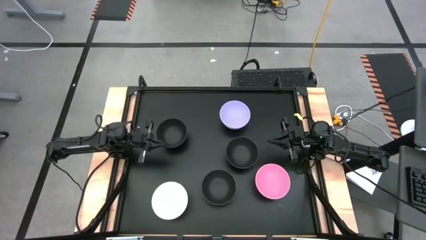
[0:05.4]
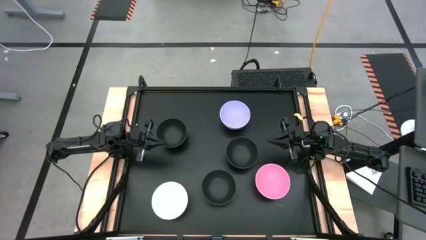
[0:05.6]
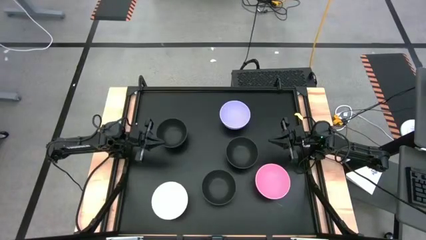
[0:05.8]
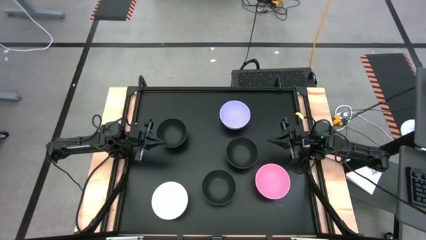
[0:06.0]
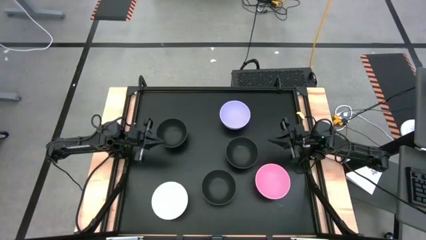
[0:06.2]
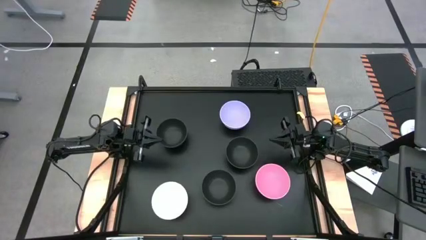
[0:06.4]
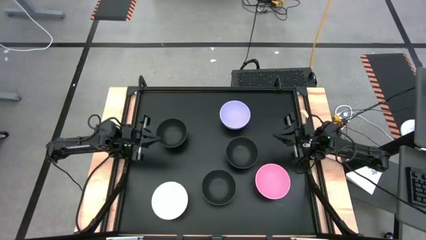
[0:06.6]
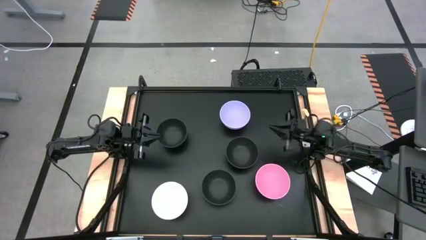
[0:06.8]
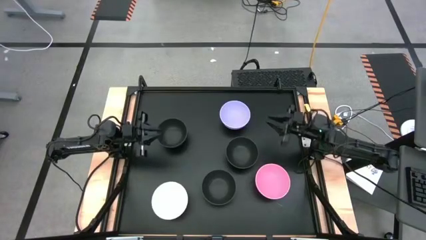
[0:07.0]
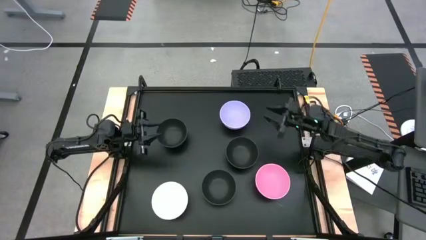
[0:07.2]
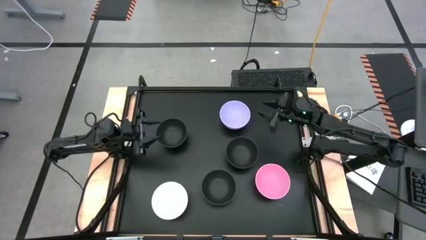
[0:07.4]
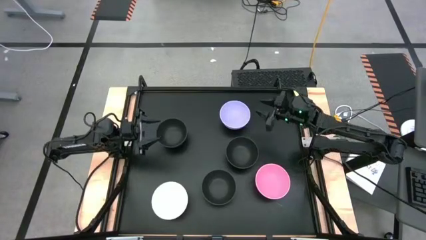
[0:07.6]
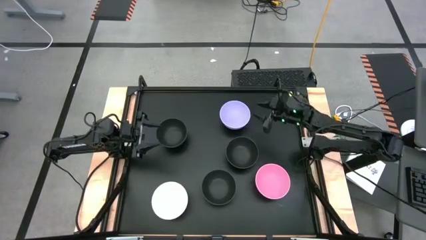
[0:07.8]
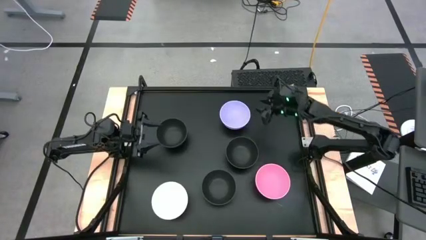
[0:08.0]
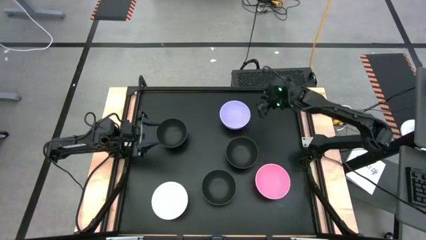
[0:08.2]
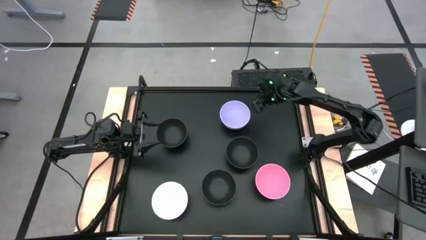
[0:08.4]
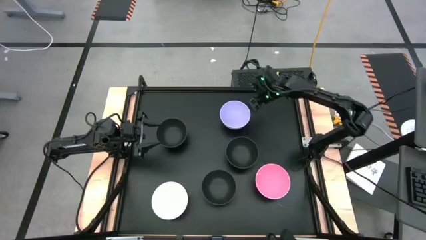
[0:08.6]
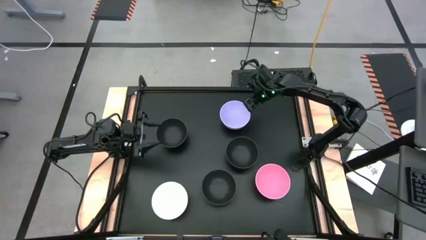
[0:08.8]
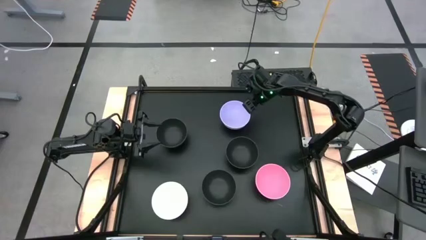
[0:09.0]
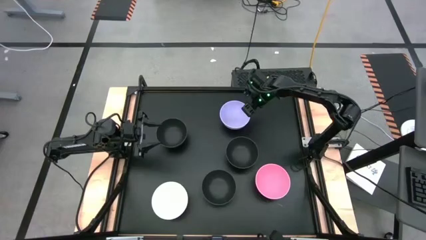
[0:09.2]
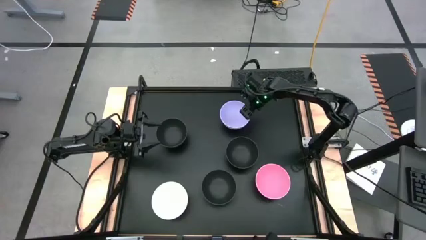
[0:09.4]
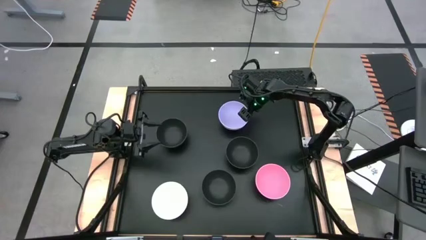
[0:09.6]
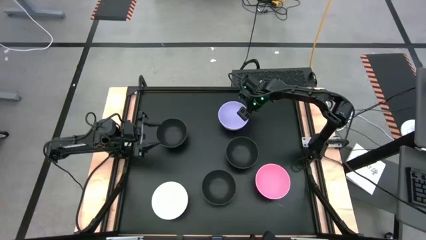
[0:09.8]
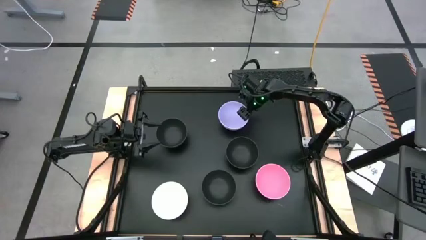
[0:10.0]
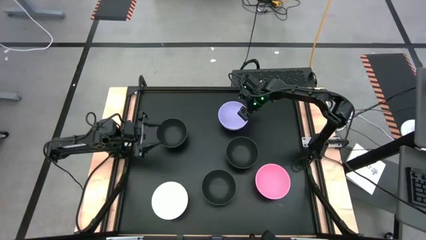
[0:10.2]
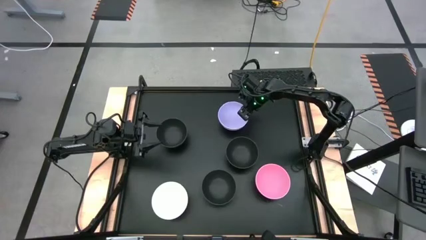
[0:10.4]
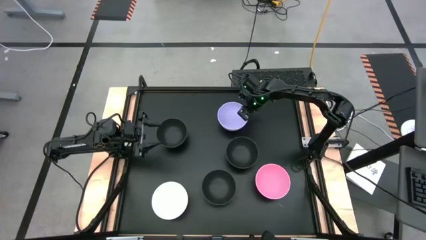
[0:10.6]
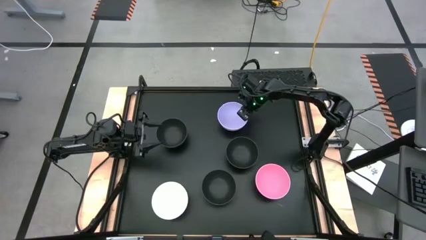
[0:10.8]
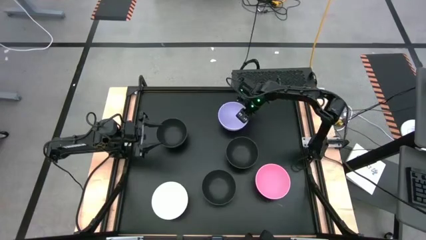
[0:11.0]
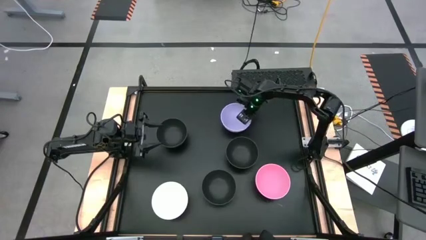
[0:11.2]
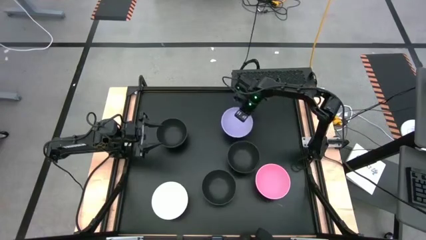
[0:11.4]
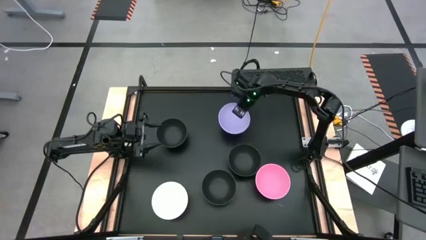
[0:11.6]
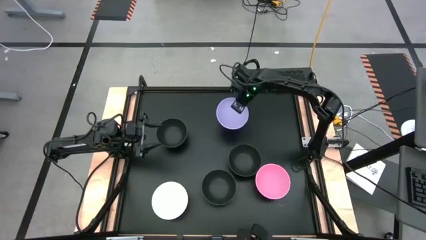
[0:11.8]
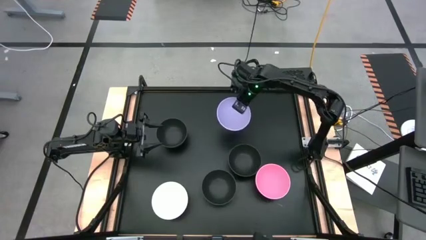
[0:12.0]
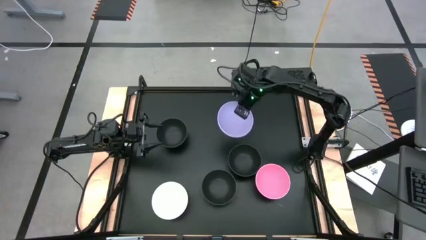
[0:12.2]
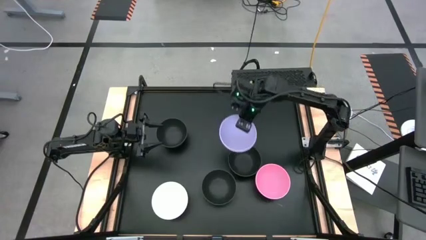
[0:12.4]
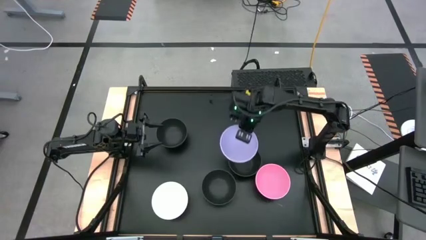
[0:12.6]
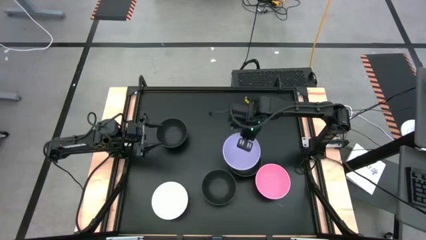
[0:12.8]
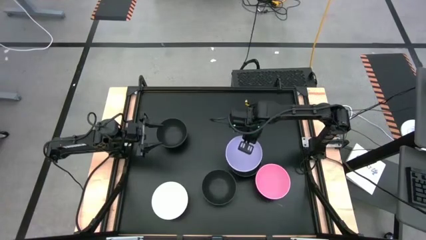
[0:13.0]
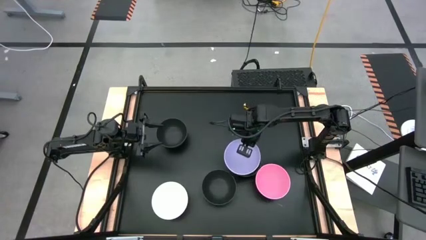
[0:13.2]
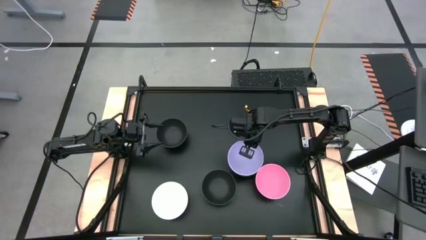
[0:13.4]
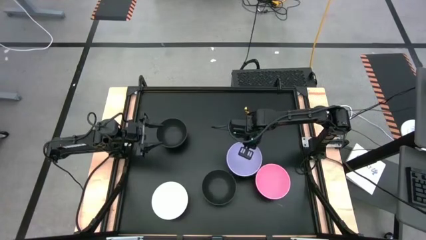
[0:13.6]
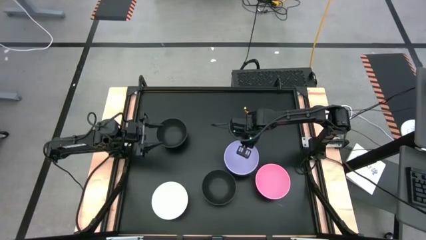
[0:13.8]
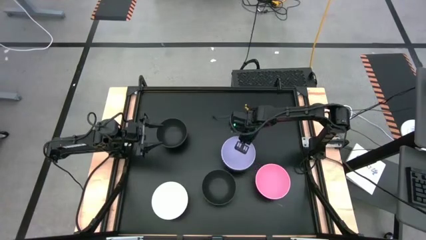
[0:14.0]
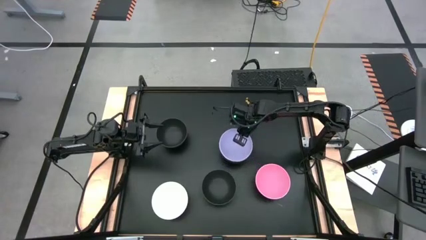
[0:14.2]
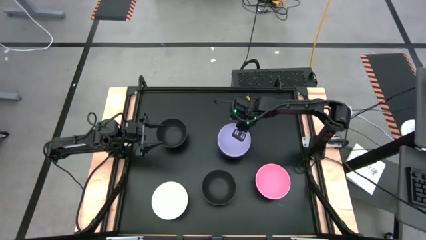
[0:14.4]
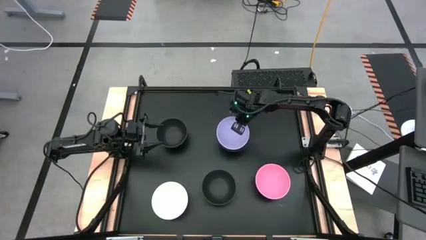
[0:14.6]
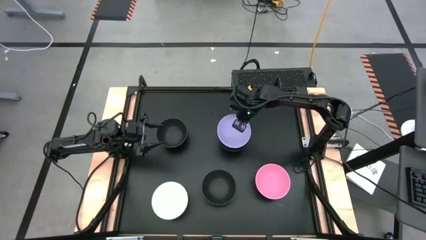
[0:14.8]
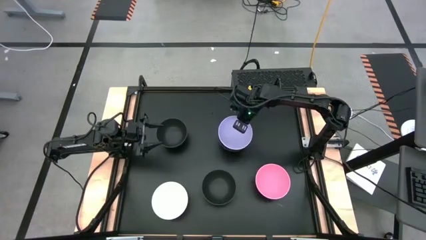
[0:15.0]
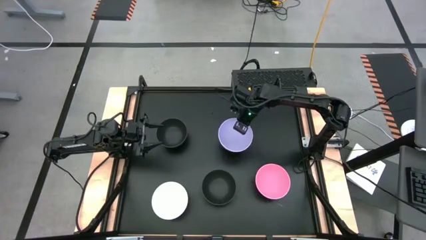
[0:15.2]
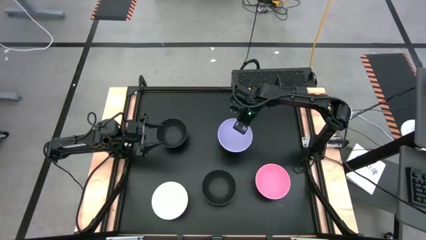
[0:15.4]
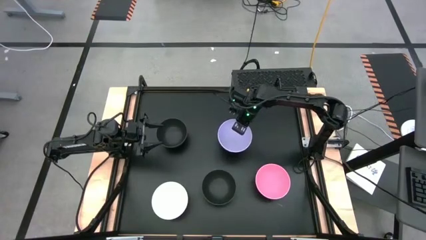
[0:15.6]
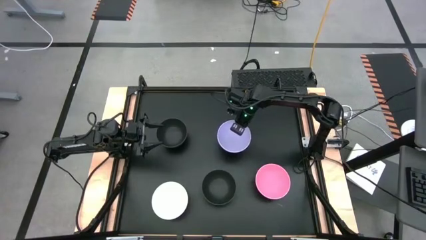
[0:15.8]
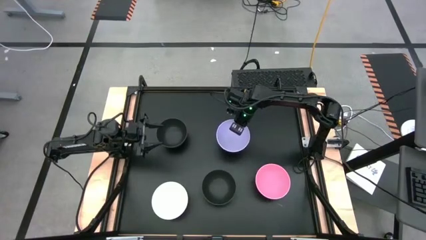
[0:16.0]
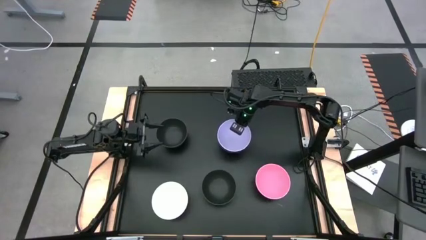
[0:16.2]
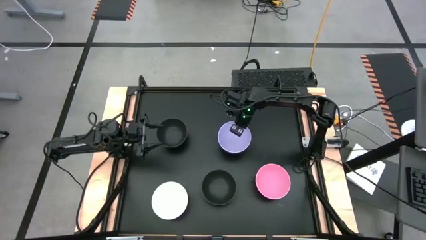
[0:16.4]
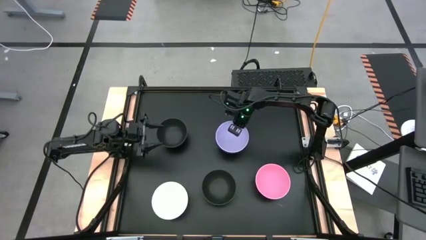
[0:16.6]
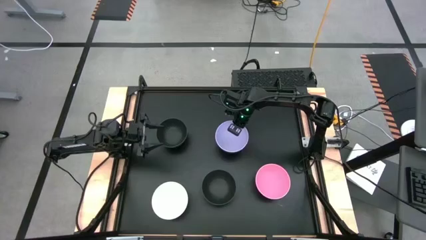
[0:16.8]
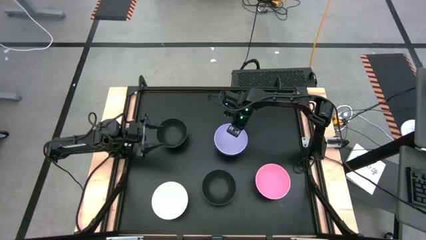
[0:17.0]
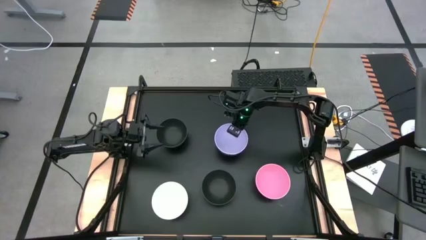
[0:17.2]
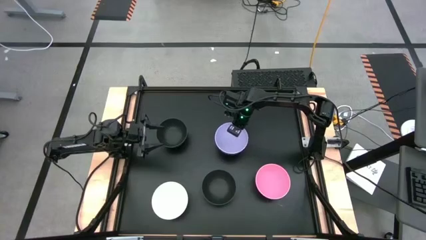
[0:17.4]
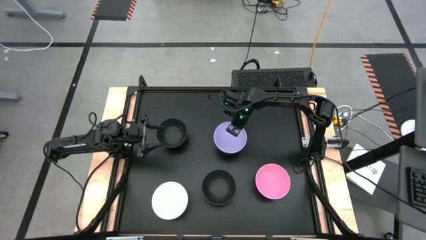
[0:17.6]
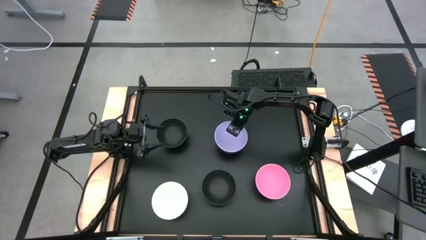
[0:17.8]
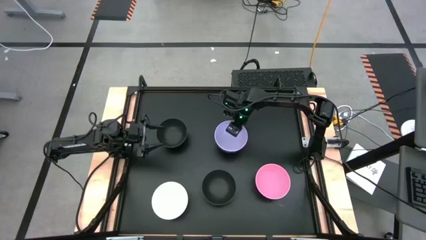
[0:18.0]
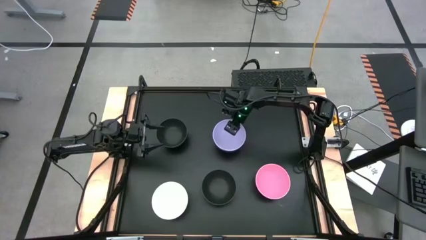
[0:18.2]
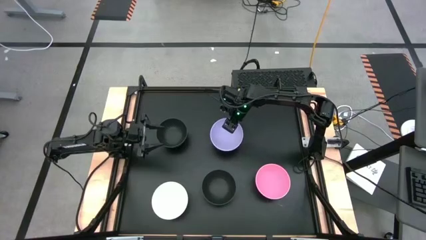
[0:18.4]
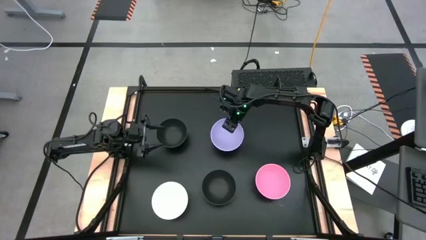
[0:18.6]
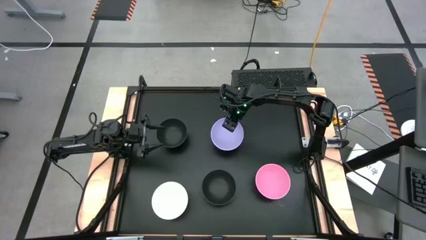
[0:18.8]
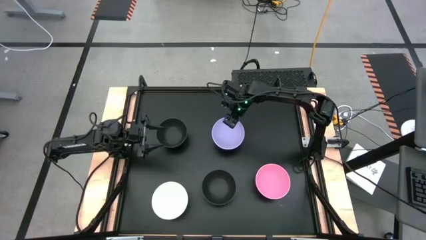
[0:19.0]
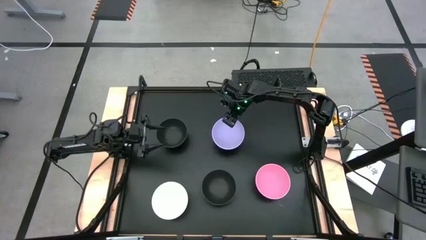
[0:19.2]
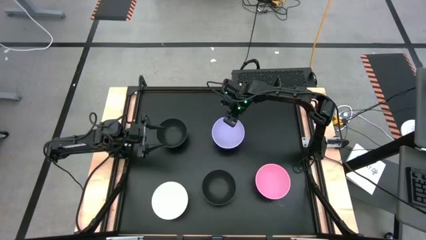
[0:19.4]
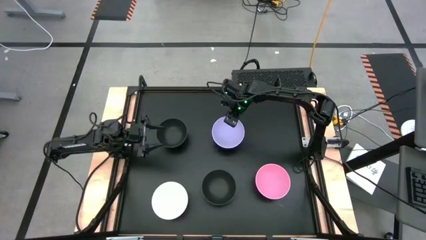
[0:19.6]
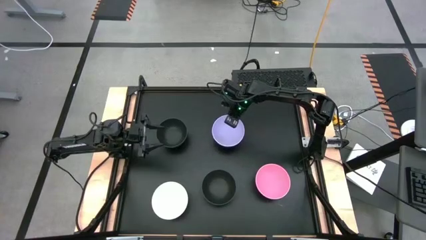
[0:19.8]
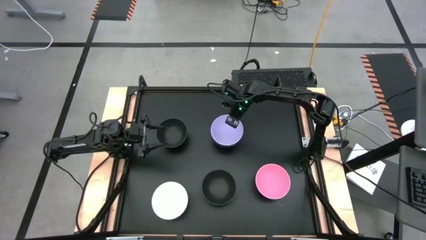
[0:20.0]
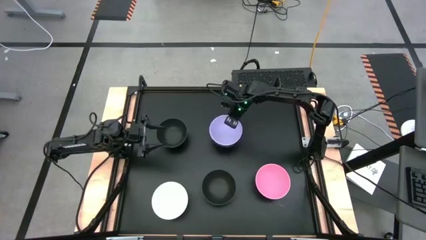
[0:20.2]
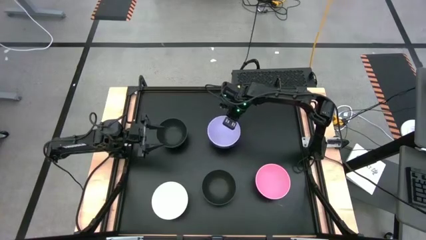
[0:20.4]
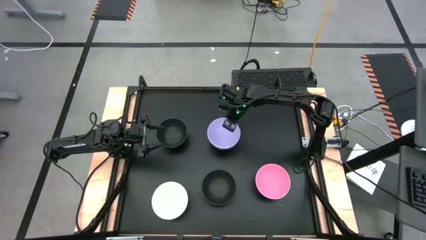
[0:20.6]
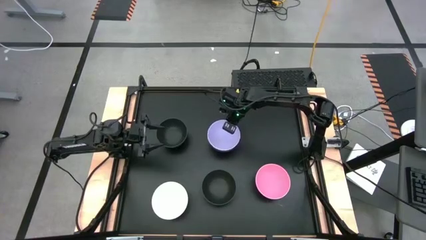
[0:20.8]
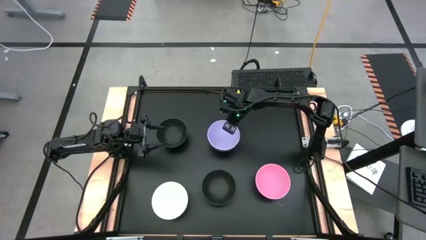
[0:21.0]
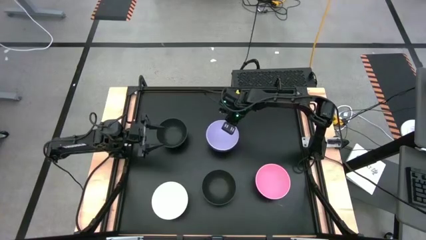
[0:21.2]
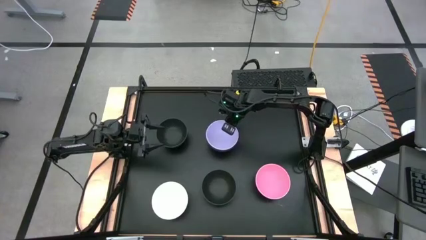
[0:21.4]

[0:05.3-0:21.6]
Task: Nest bowls inside each other
Stack the purple bowl on top of the right black bowl
